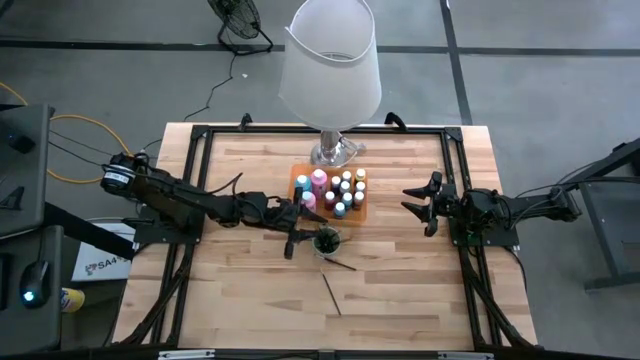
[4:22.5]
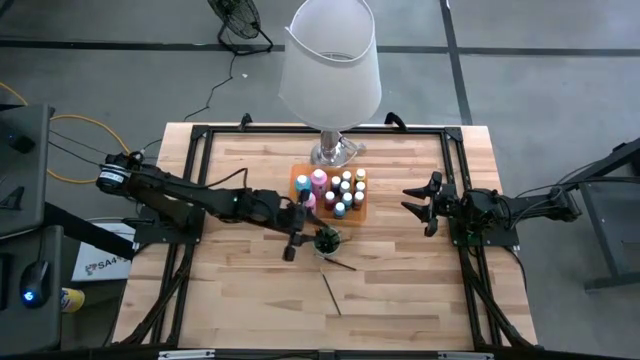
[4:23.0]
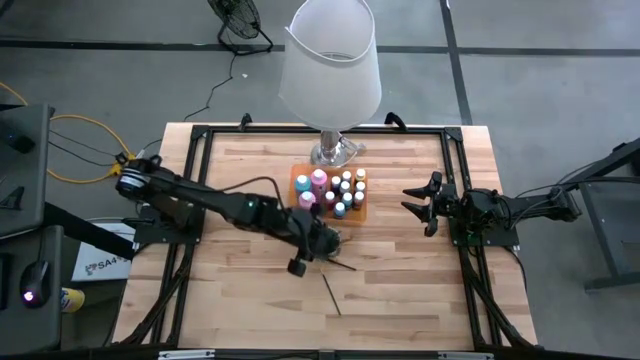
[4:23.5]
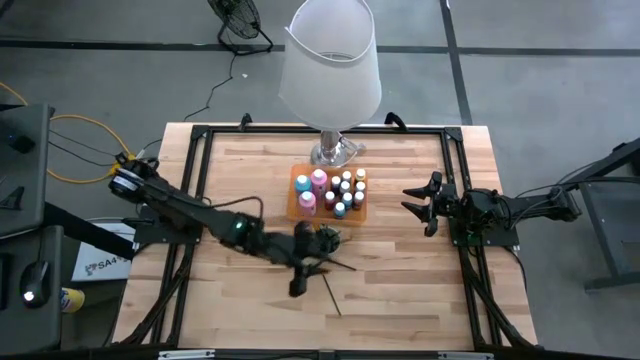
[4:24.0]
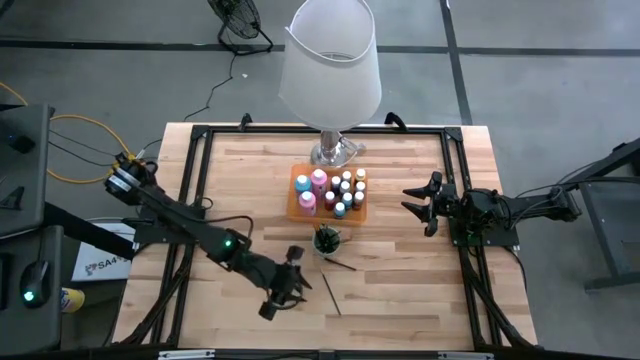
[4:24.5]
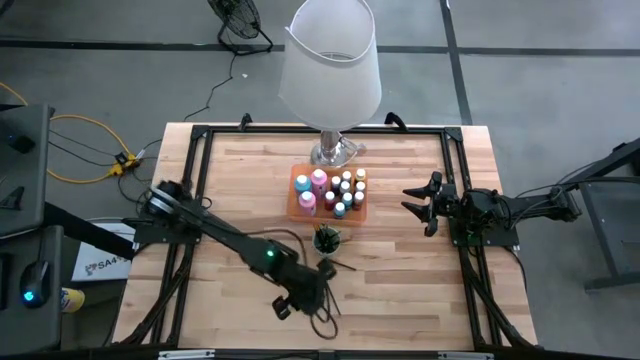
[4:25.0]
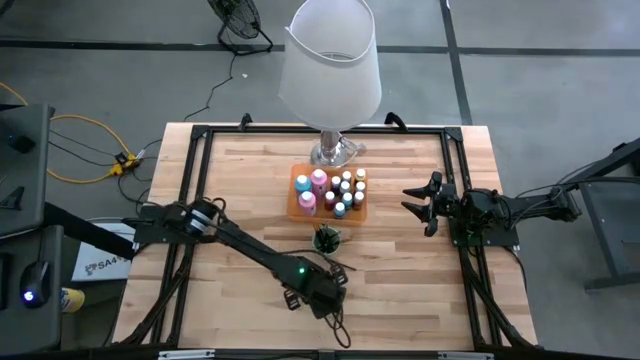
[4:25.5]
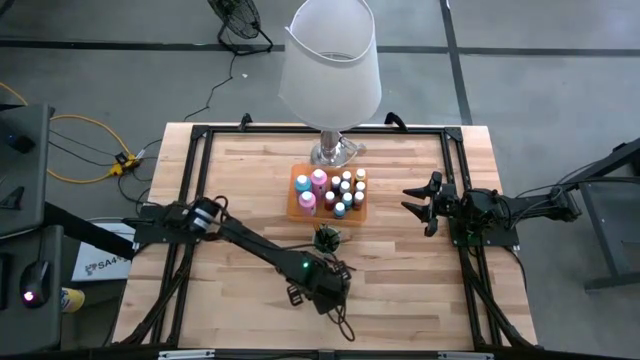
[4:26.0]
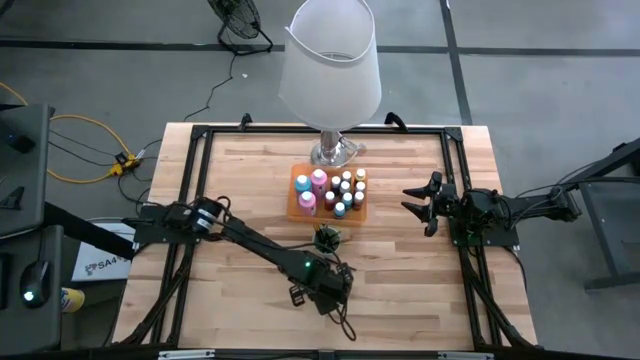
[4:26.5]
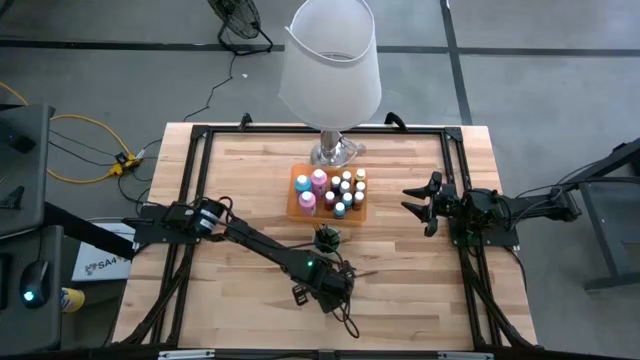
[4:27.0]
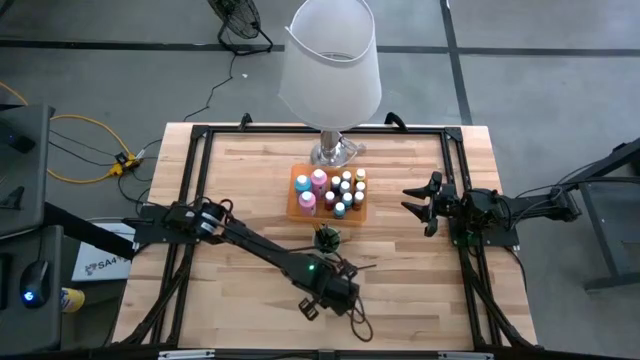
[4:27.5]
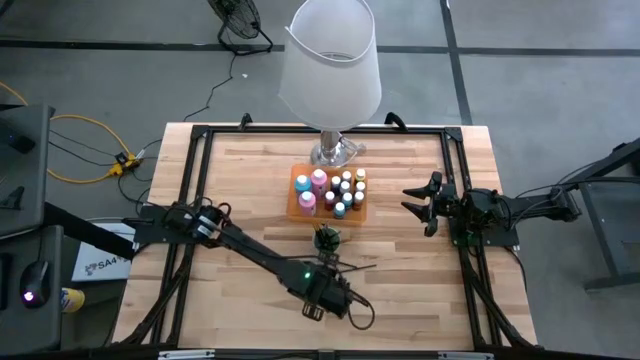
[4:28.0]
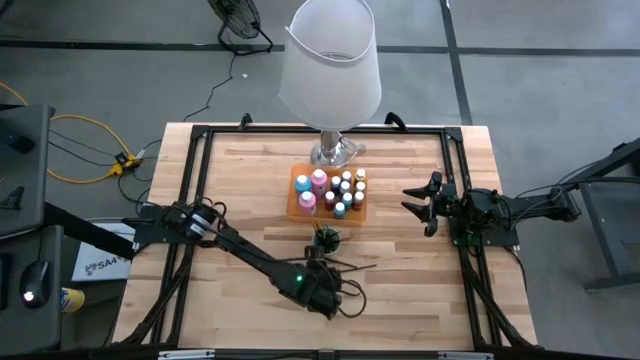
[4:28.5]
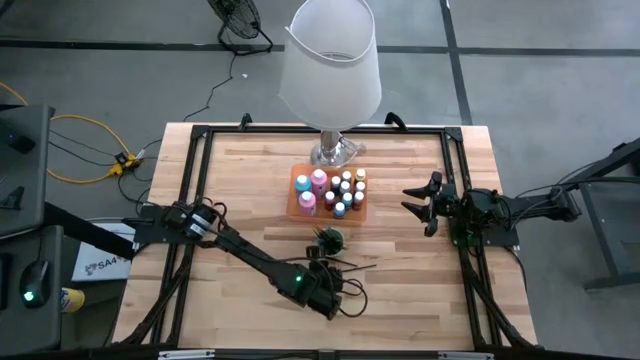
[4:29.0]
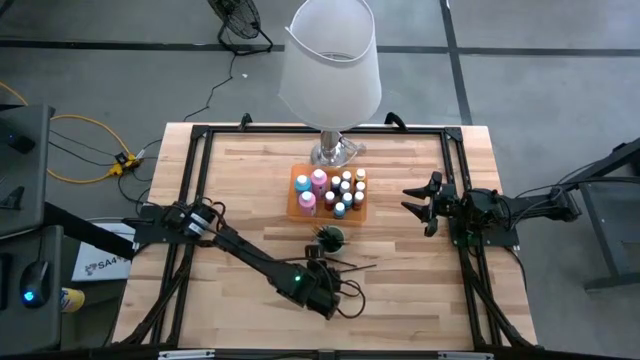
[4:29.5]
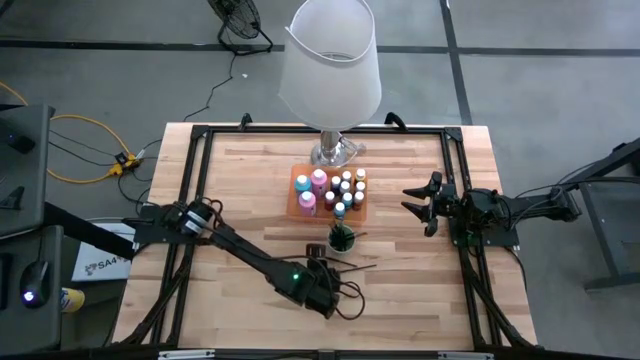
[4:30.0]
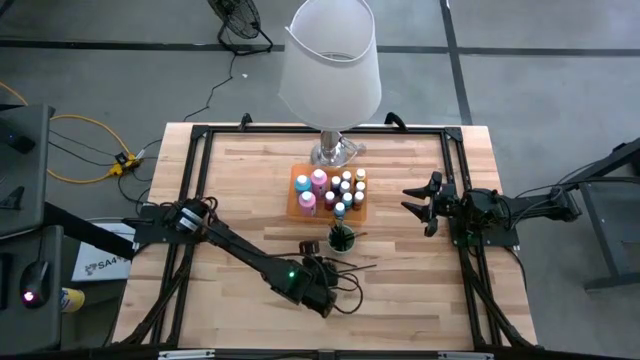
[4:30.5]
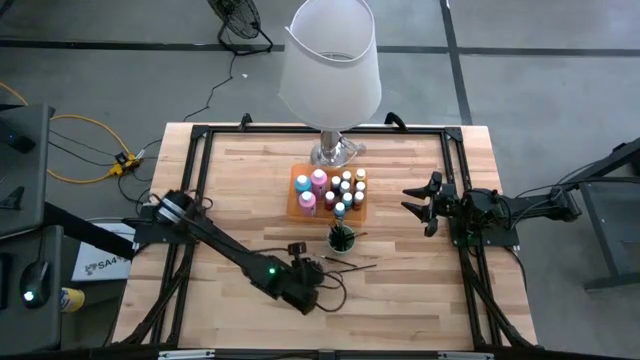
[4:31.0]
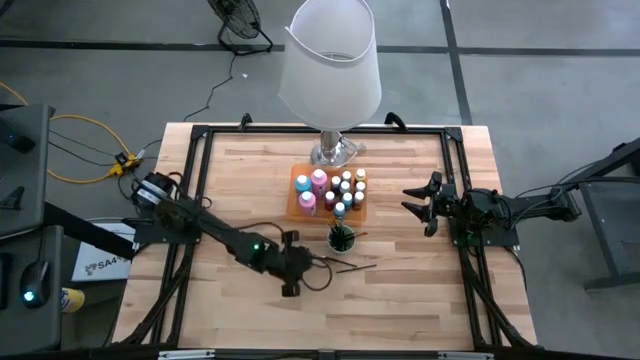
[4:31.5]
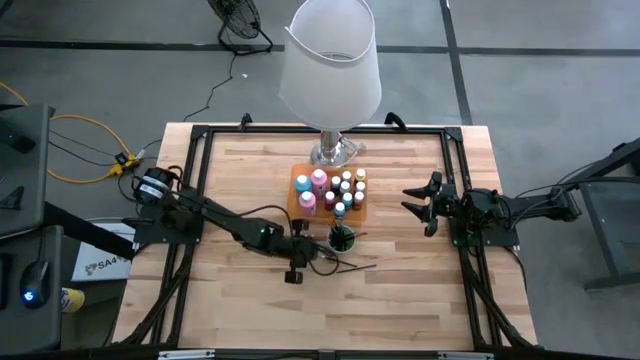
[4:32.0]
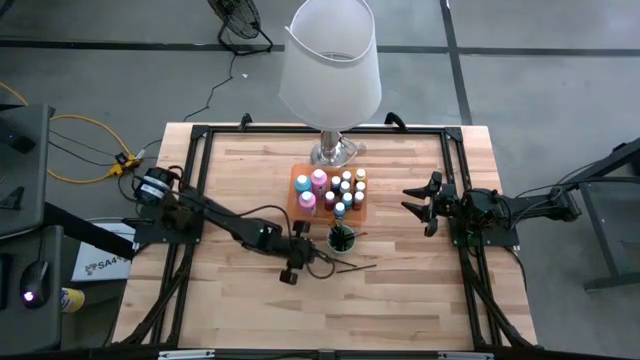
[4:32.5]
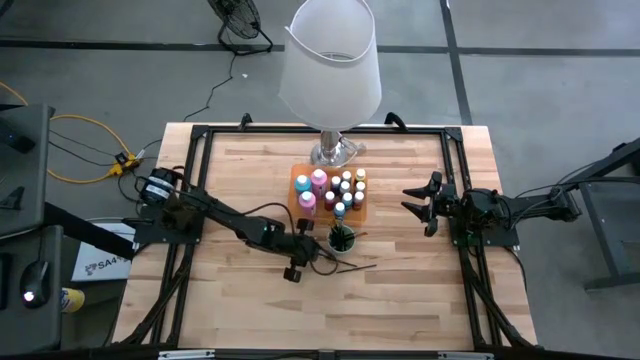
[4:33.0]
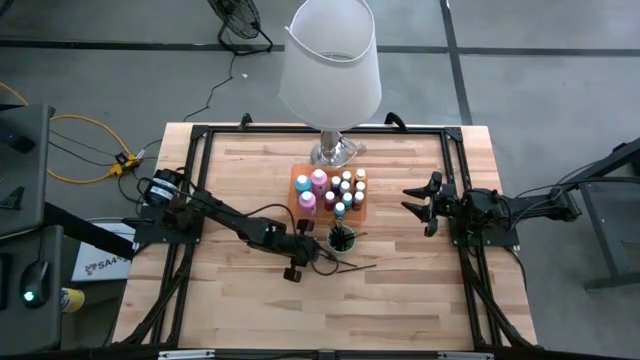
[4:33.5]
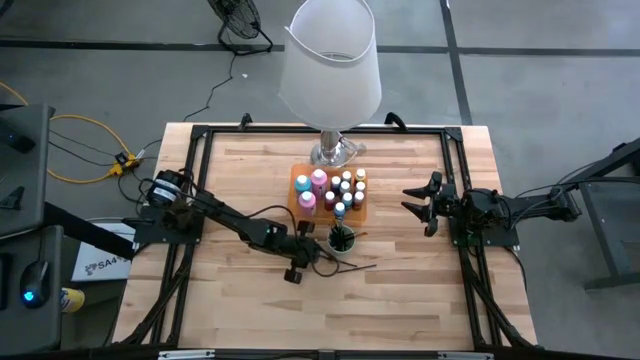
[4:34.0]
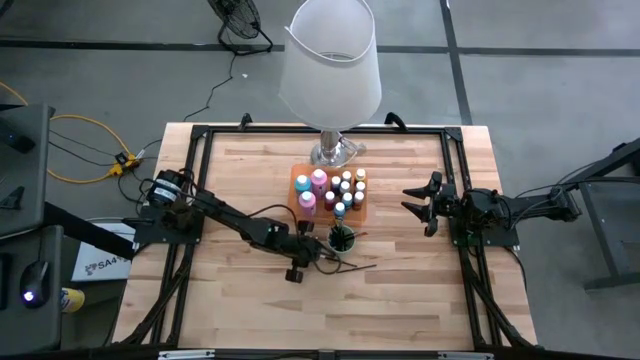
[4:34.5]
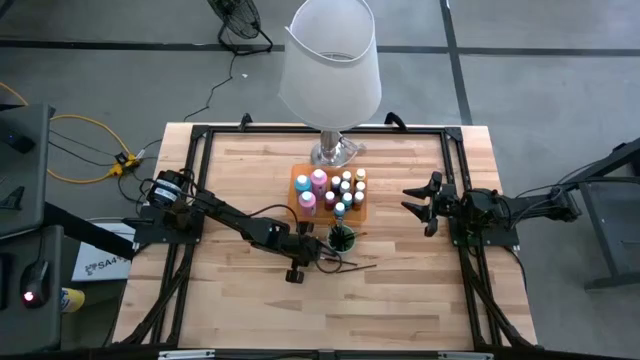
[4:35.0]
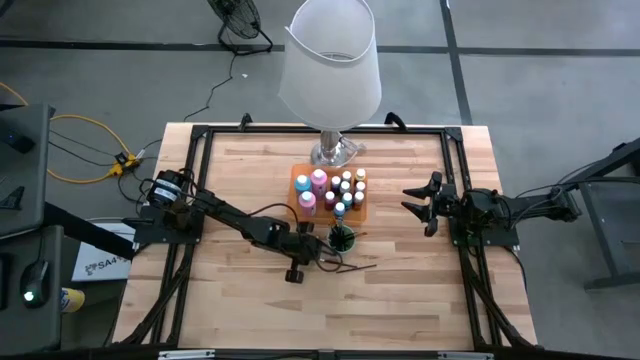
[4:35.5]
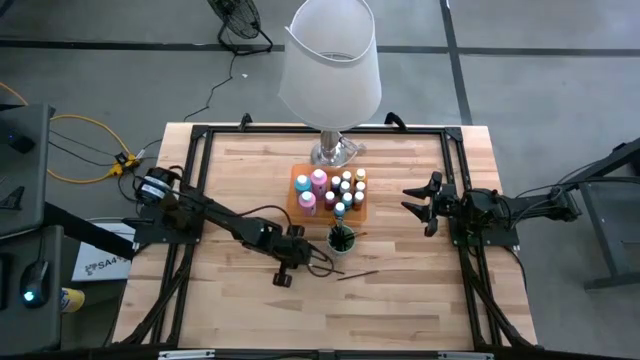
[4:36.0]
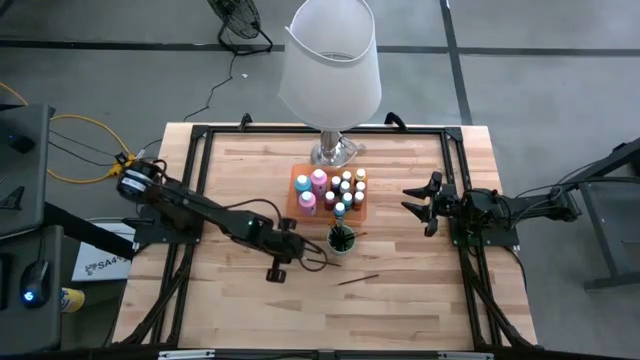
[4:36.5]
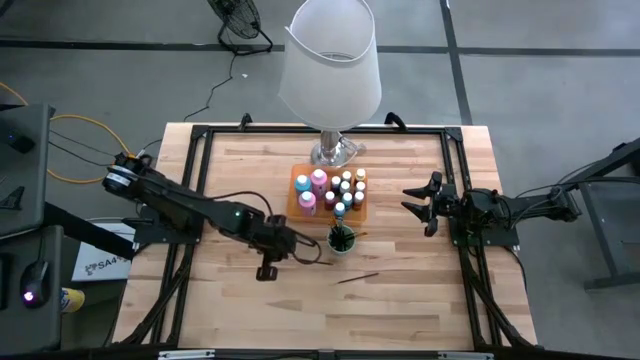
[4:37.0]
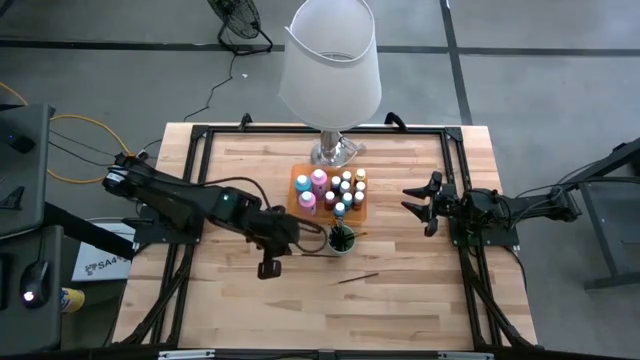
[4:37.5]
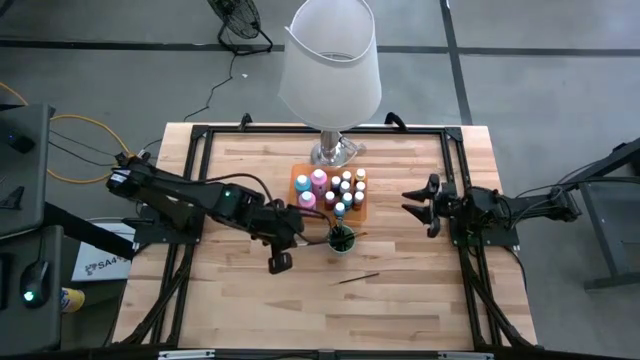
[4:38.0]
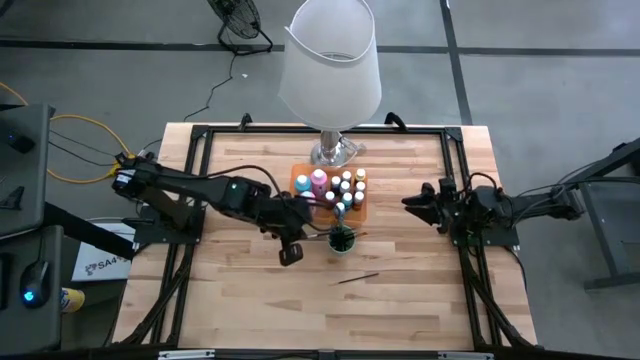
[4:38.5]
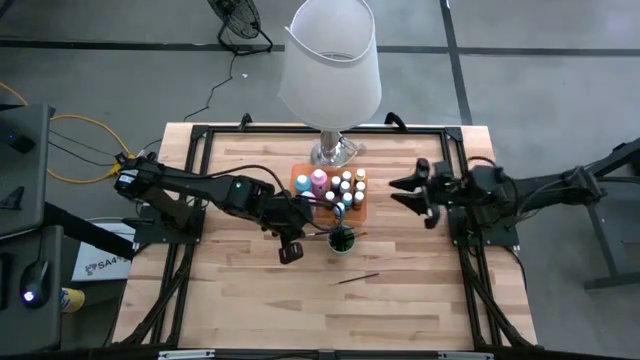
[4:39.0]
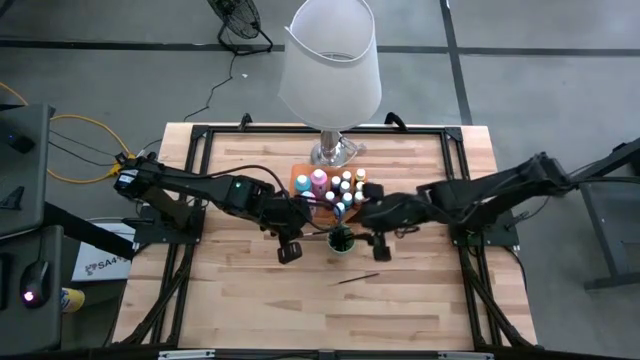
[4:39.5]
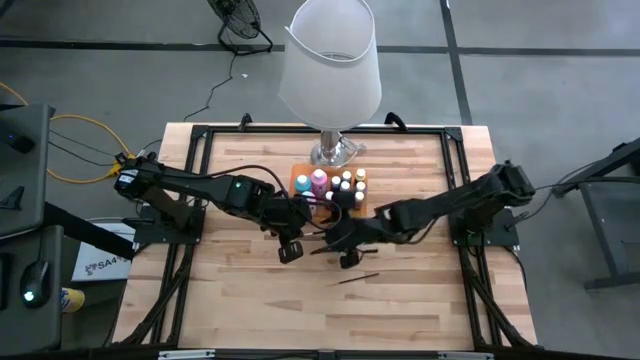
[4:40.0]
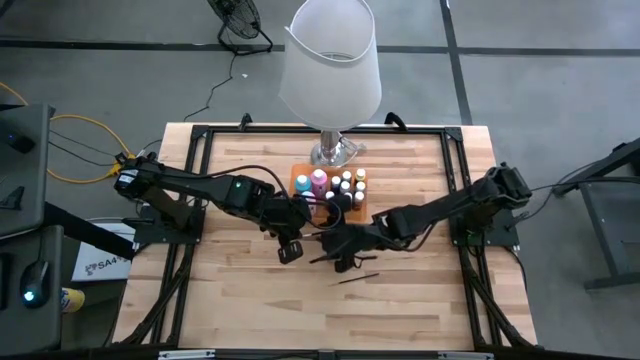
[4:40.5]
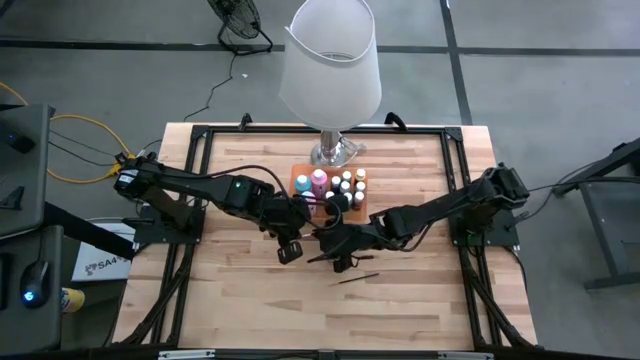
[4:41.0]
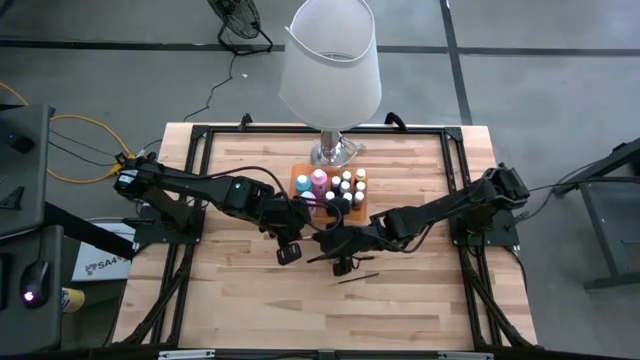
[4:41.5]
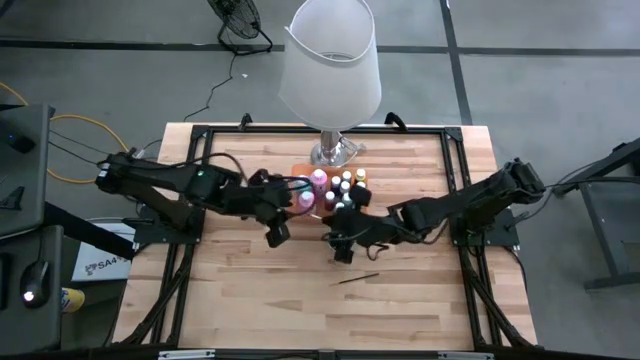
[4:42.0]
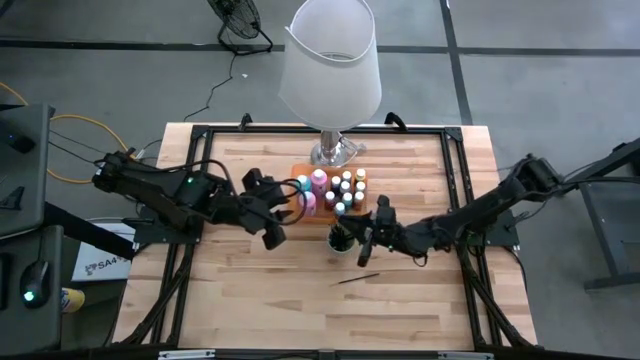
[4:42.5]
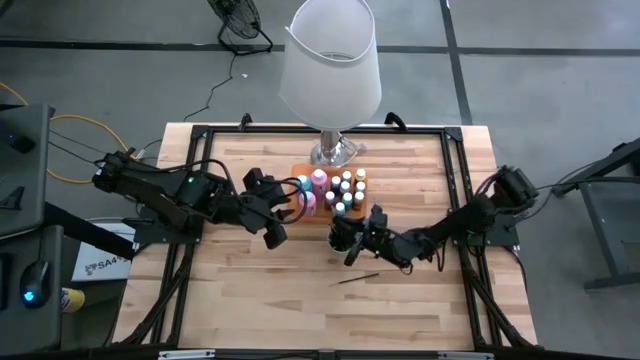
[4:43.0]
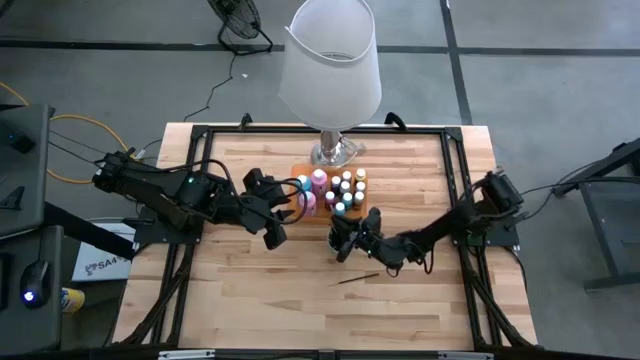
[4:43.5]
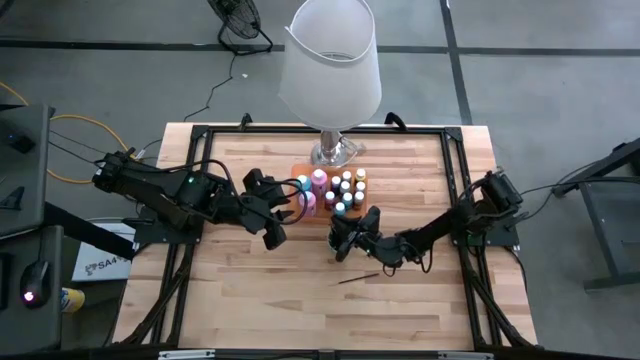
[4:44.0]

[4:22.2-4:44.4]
Task: Pick & Place Paint Supplies
Put the gray paintbrushes into the green cup
